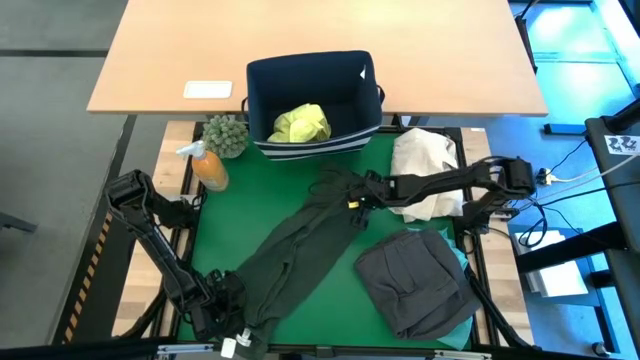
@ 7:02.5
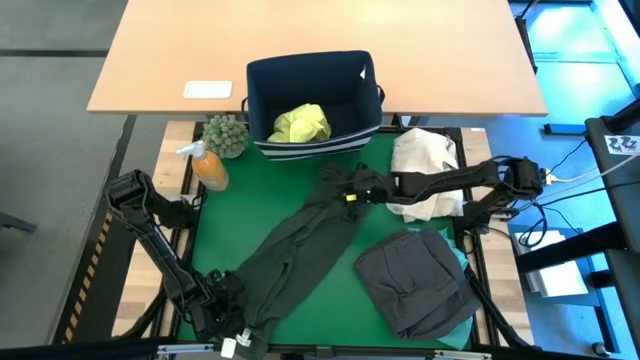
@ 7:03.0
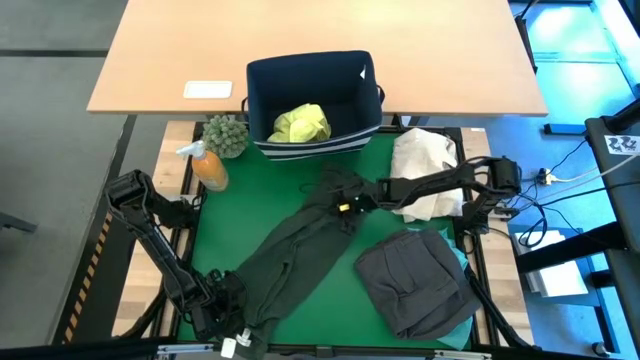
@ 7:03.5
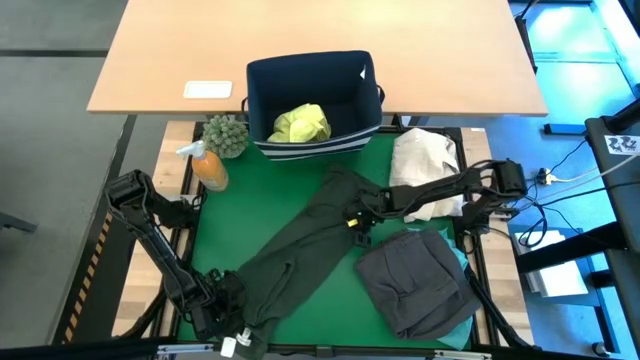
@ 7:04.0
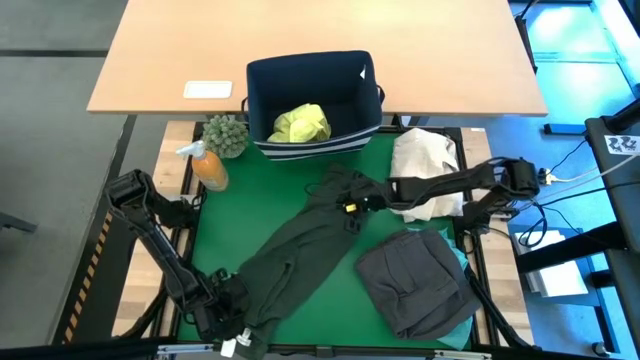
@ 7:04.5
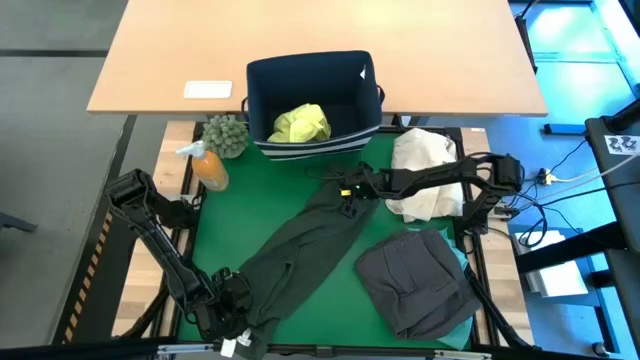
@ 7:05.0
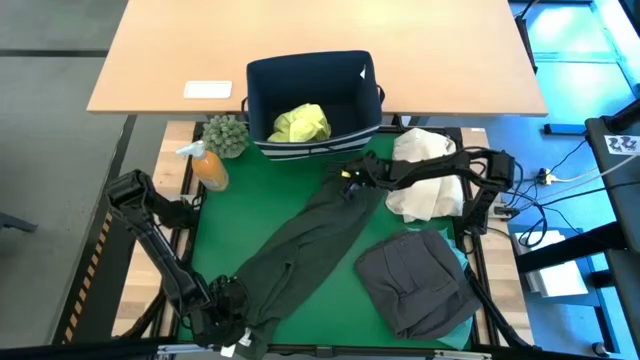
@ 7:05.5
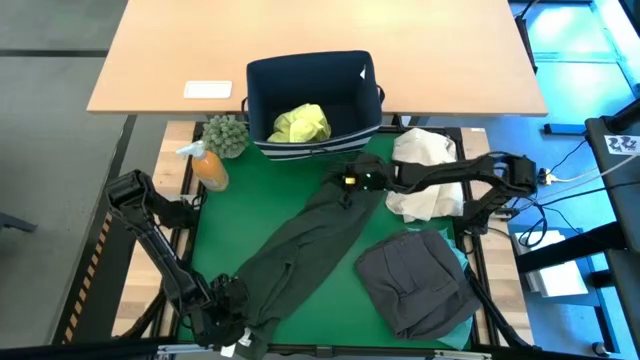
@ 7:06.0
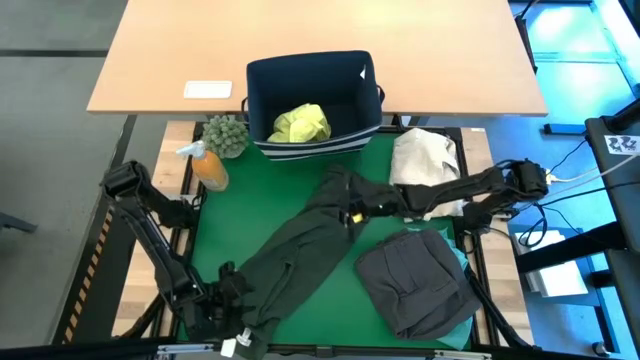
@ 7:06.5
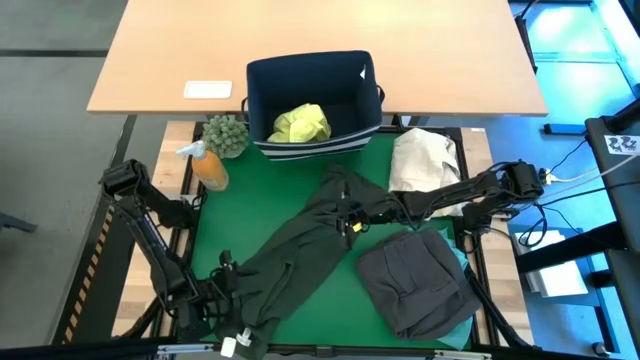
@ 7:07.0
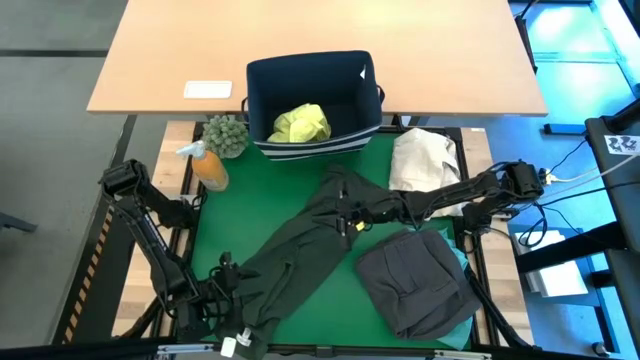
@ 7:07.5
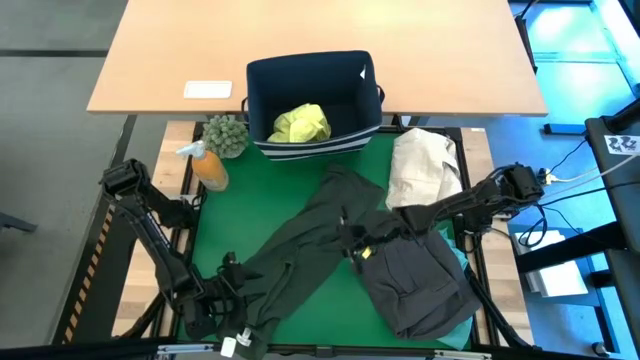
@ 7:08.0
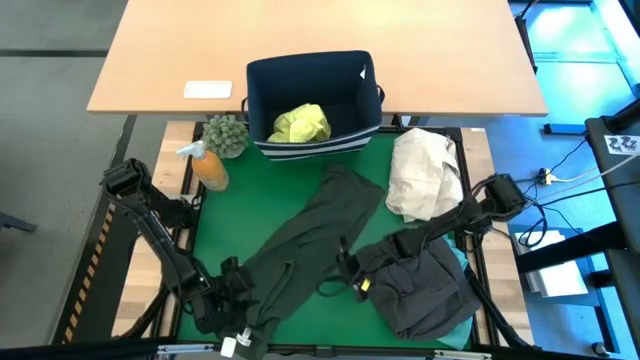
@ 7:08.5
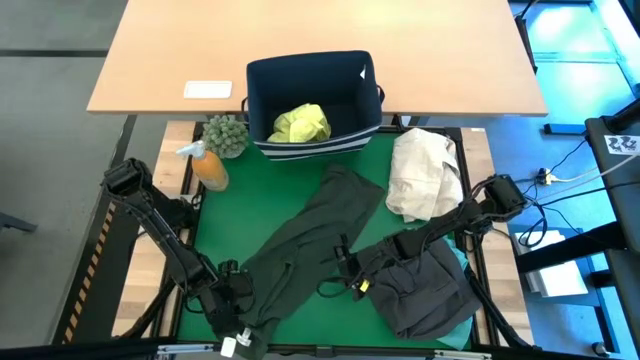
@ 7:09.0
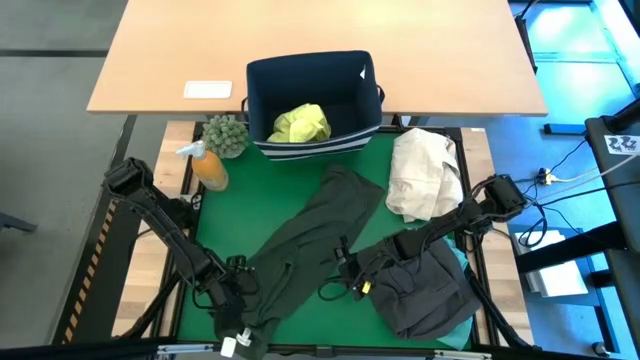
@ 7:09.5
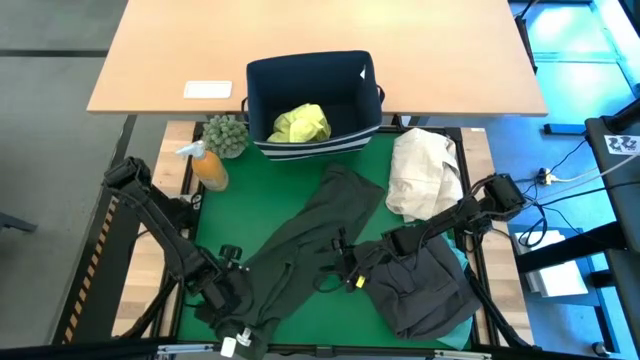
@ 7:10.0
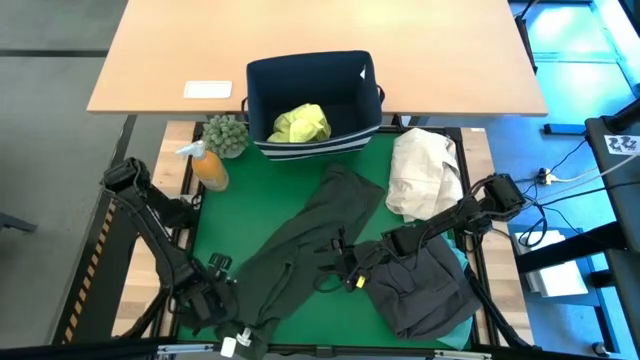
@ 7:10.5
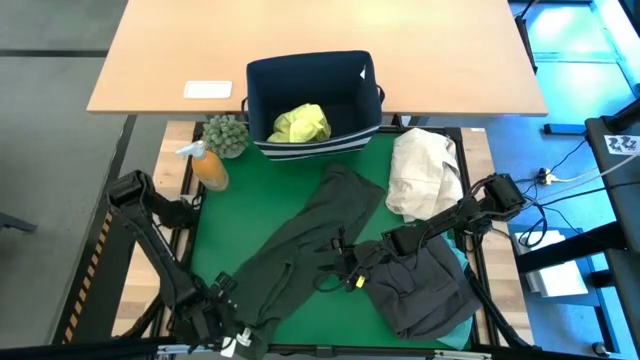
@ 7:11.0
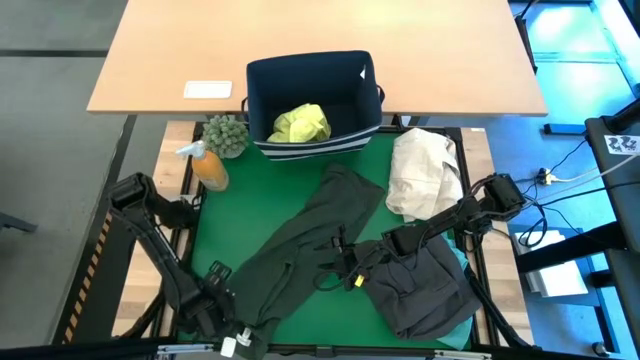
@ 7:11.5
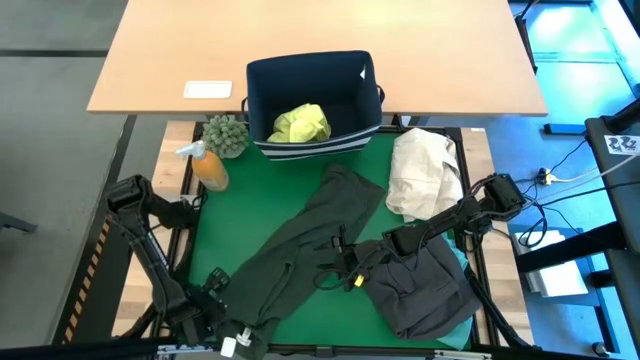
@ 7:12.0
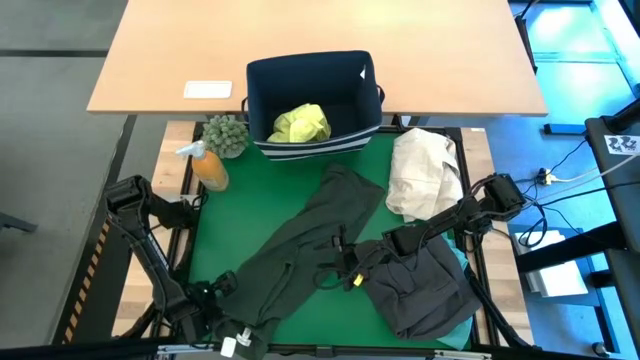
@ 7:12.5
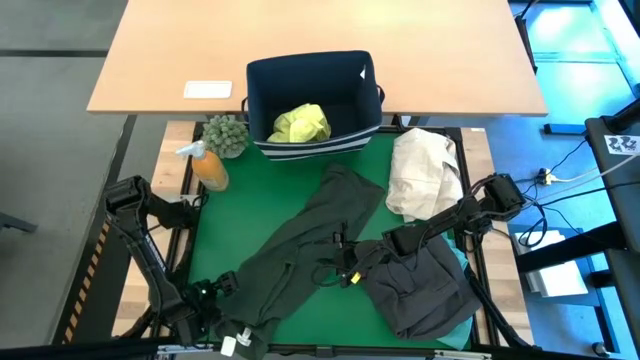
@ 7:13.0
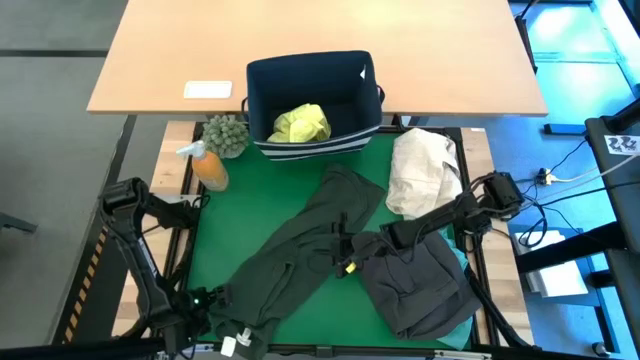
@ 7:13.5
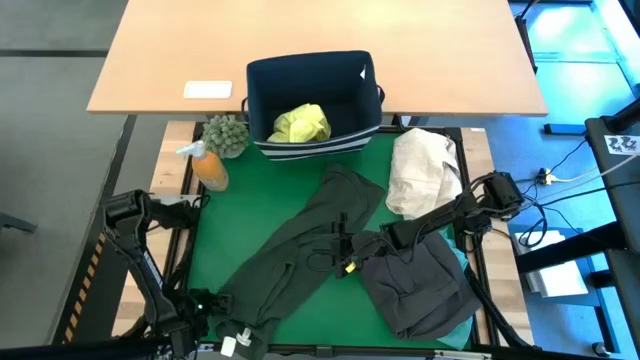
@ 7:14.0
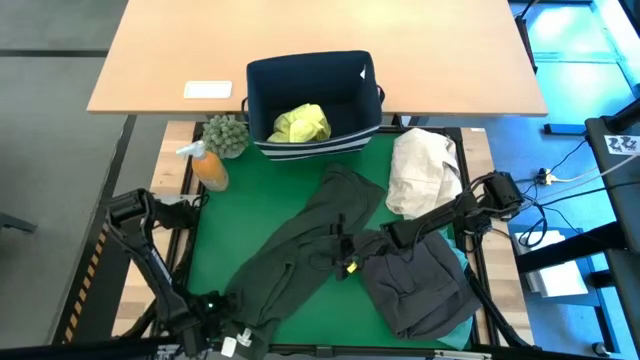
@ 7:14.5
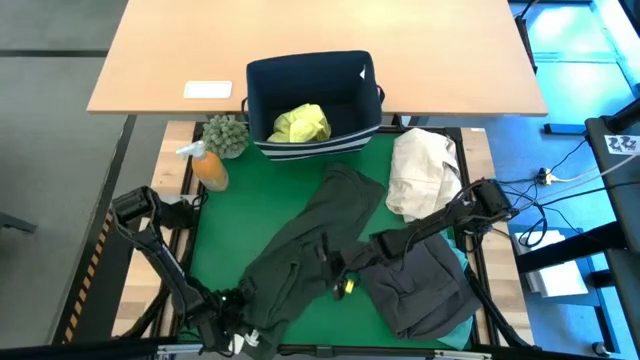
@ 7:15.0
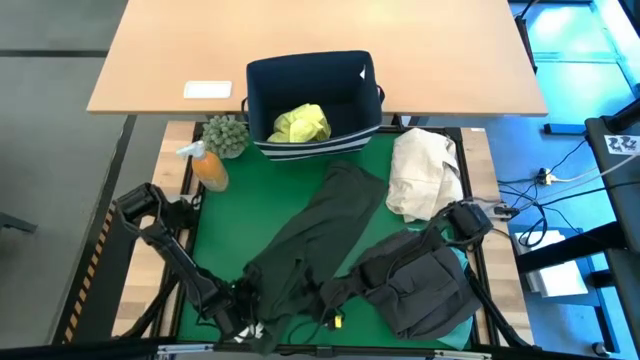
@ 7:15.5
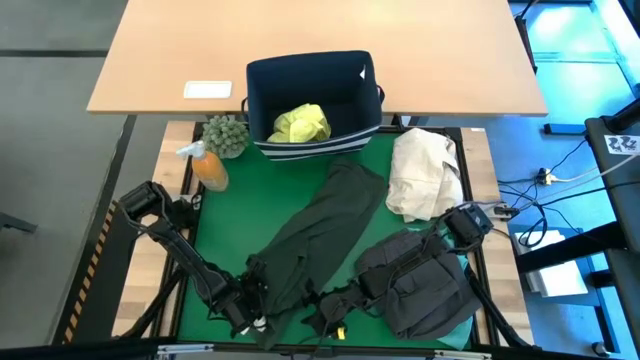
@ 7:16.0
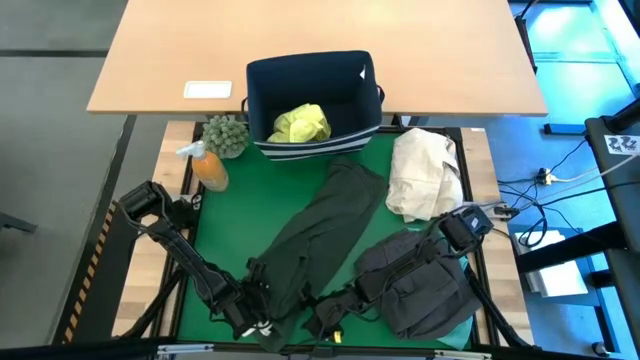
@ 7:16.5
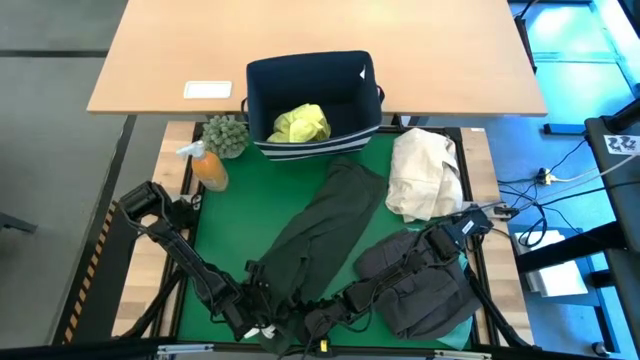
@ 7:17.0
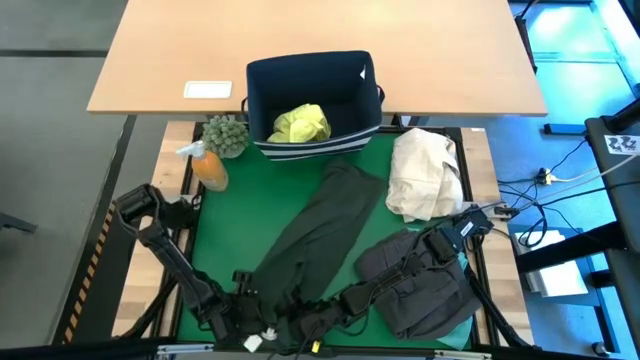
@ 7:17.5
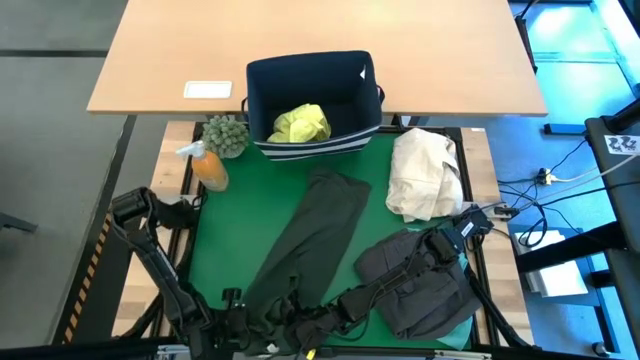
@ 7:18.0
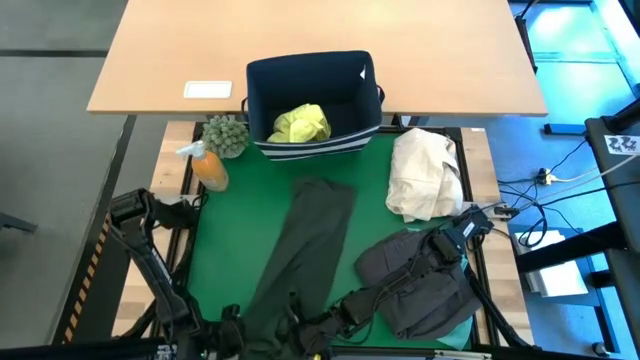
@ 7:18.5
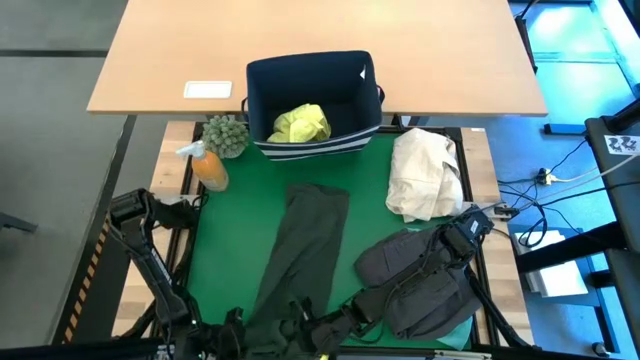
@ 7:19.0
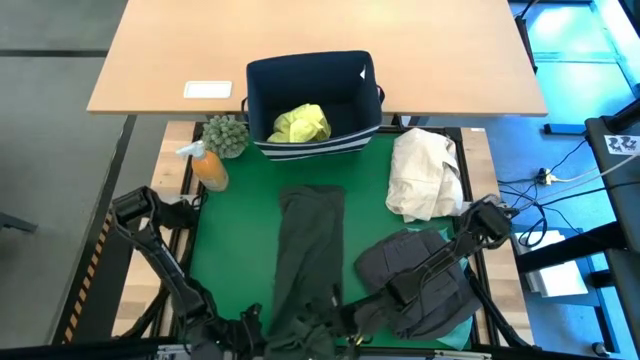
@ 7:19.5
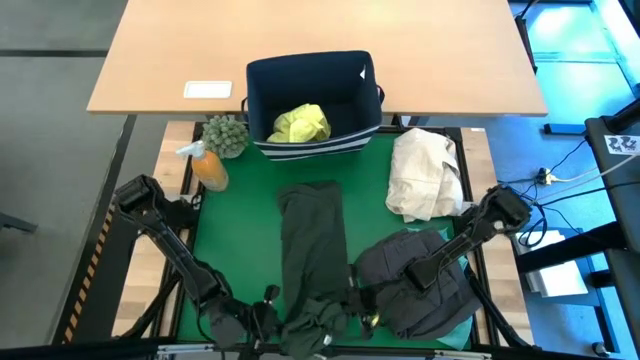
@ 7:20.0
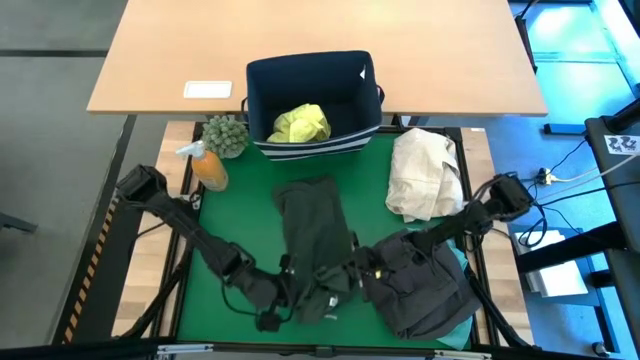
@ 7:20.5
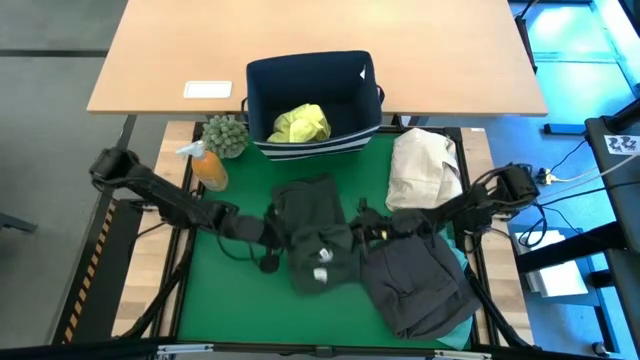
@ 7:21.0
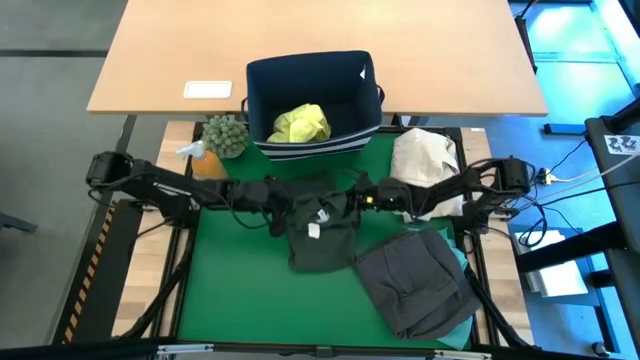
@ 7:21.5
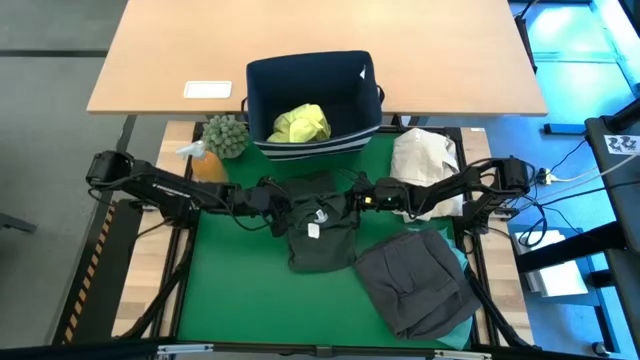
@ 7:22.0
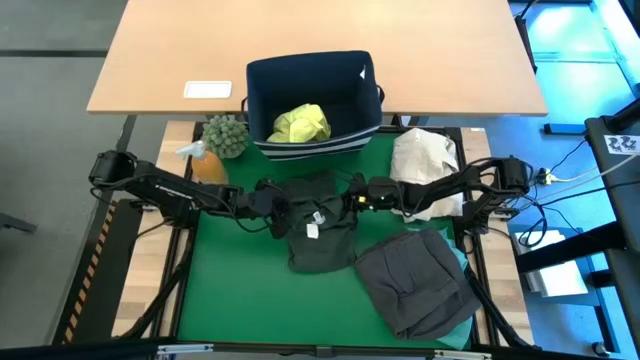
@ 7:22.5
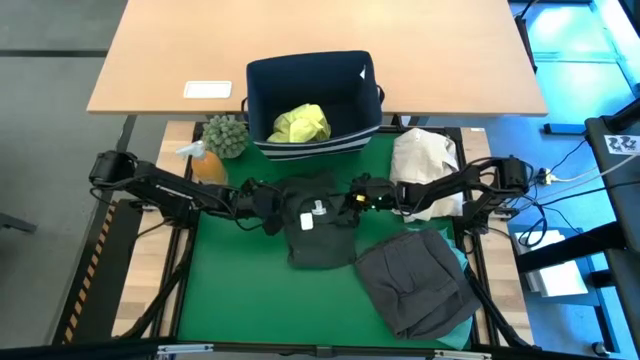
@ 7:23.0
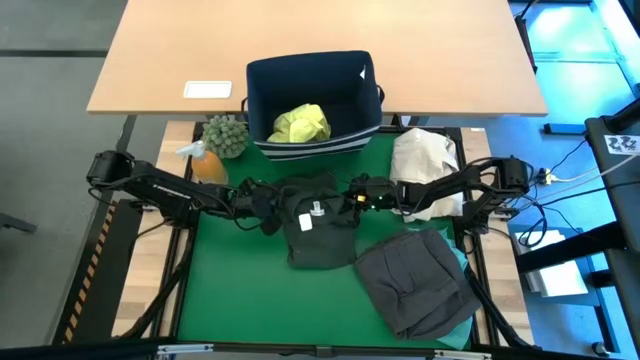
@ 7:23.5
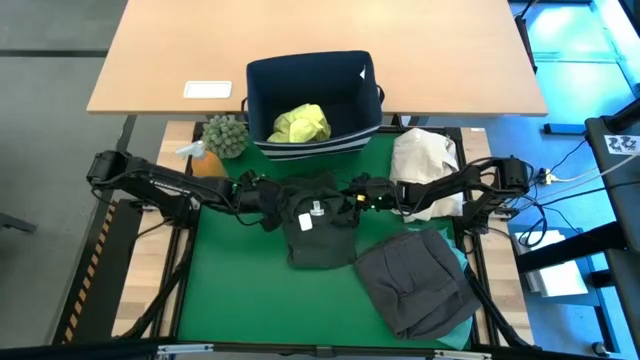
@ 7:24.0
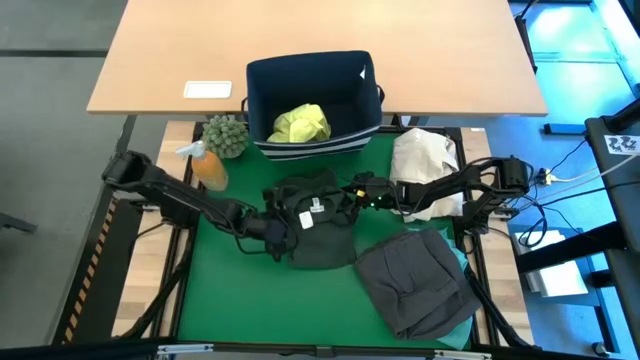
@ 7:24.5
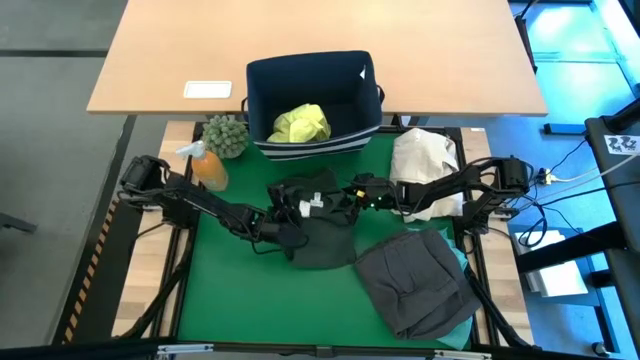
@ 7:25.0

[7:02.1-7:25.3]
Task: Fold laundry
Fold the green polo shirt
